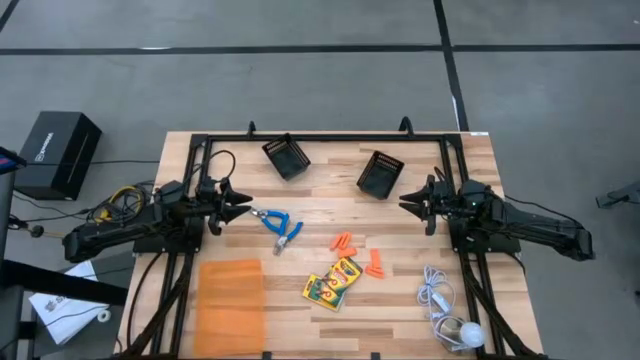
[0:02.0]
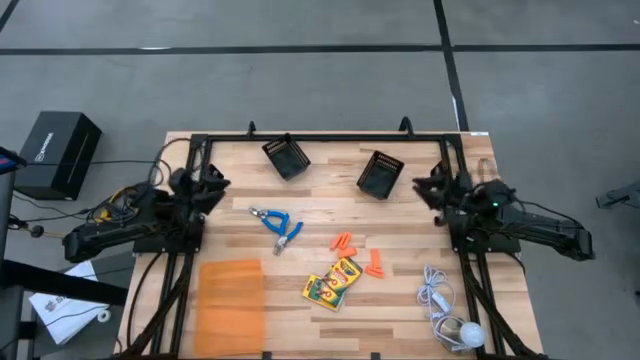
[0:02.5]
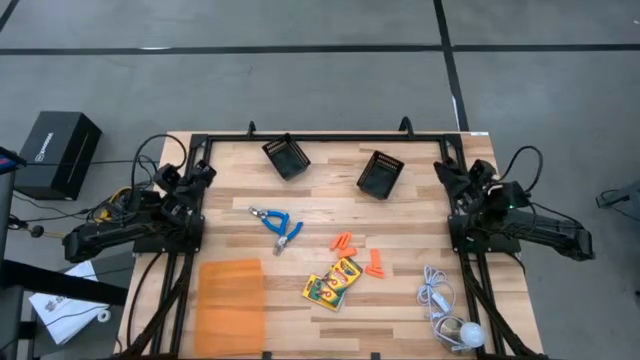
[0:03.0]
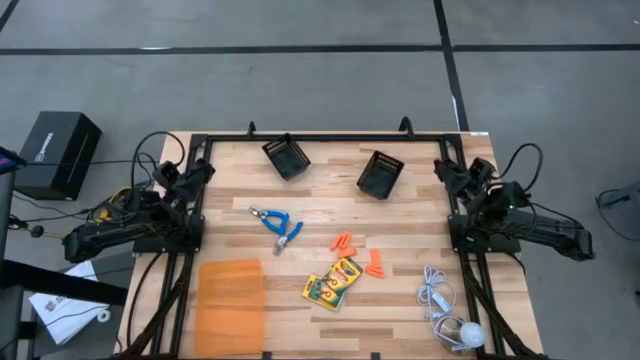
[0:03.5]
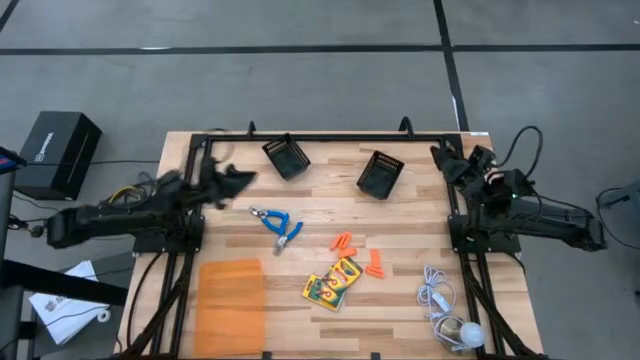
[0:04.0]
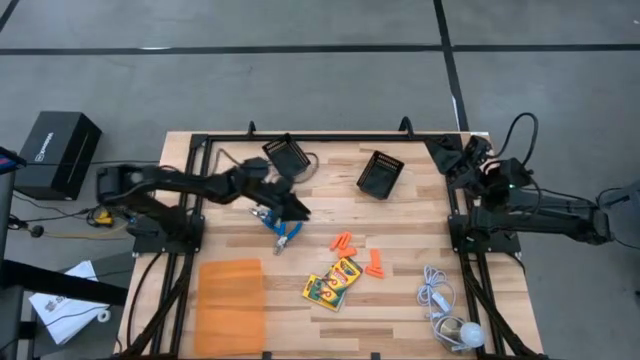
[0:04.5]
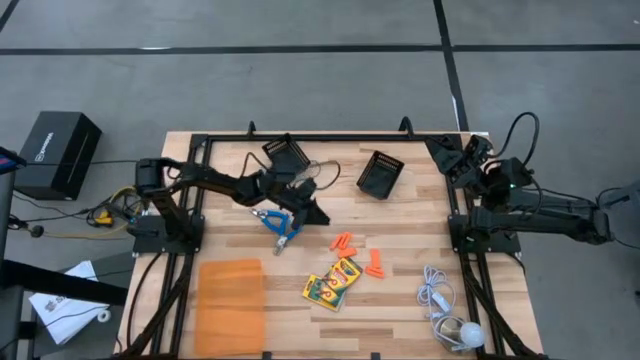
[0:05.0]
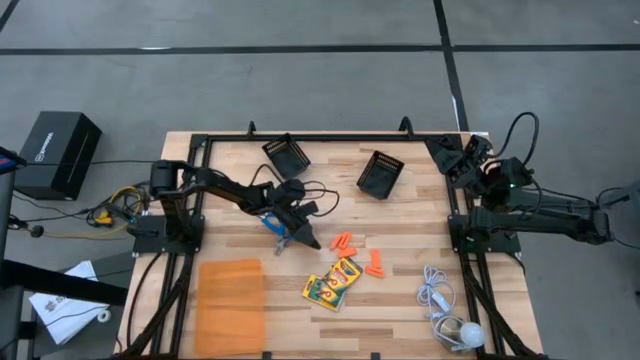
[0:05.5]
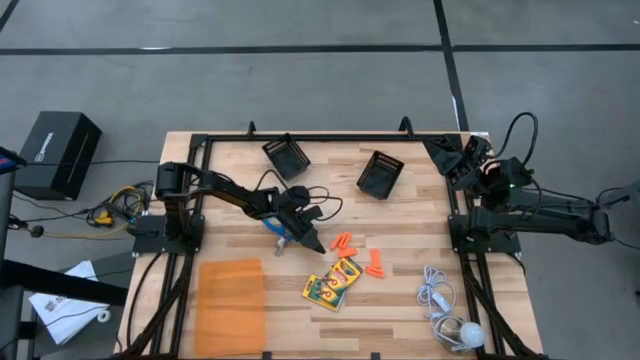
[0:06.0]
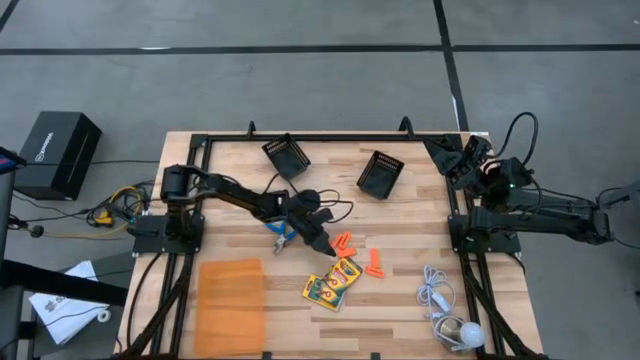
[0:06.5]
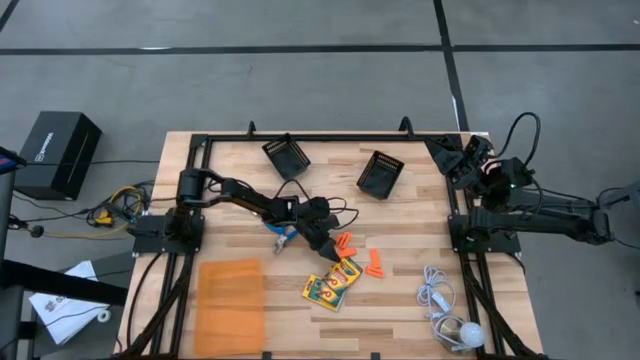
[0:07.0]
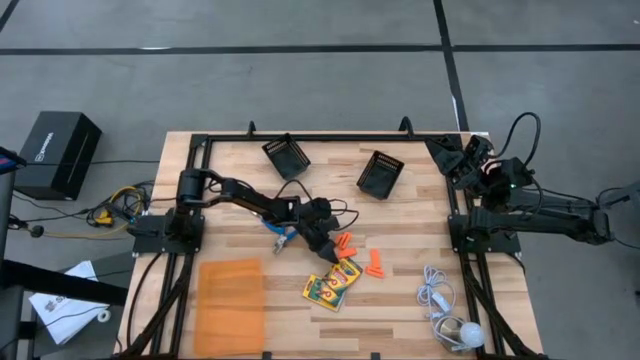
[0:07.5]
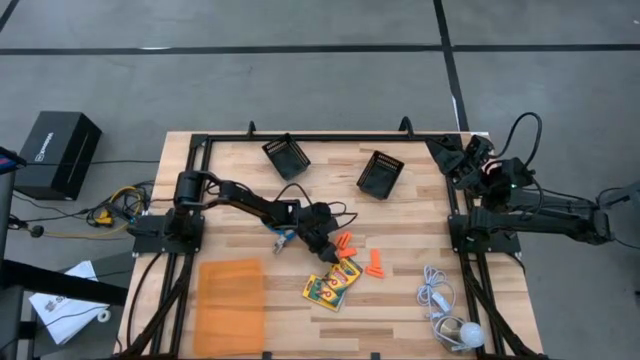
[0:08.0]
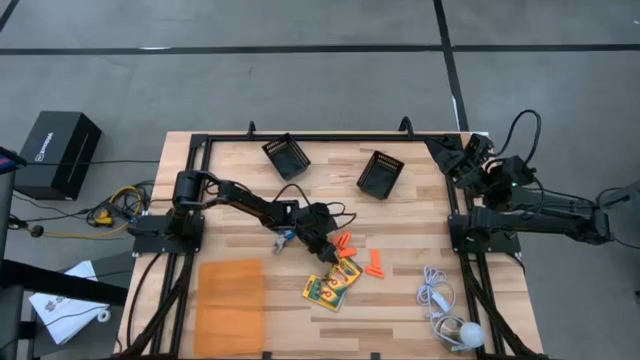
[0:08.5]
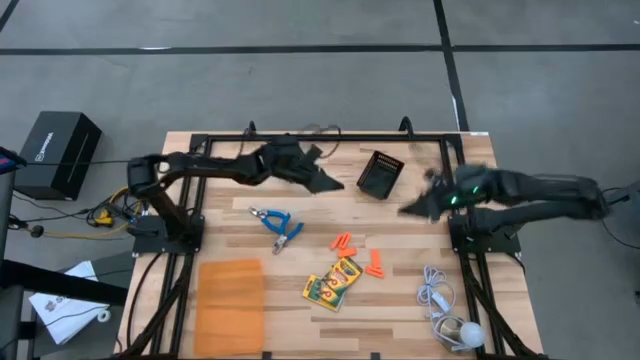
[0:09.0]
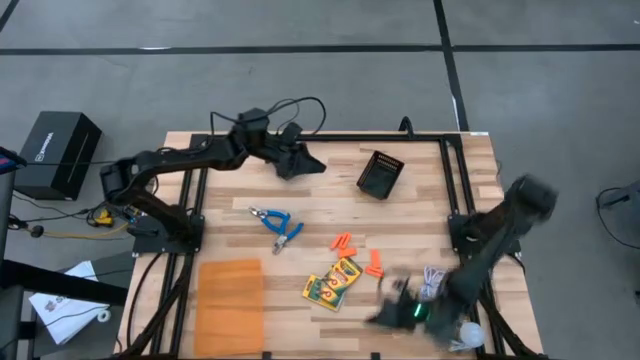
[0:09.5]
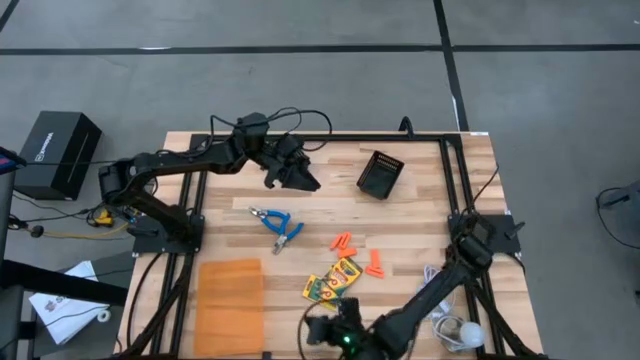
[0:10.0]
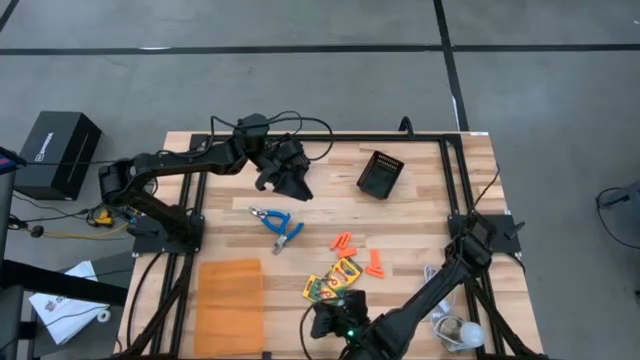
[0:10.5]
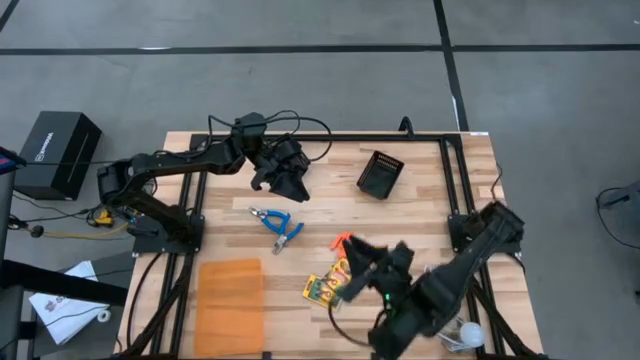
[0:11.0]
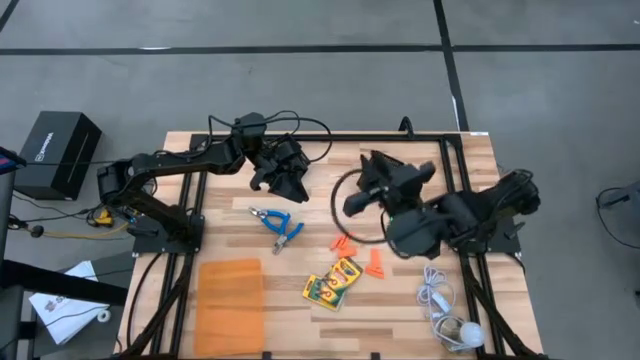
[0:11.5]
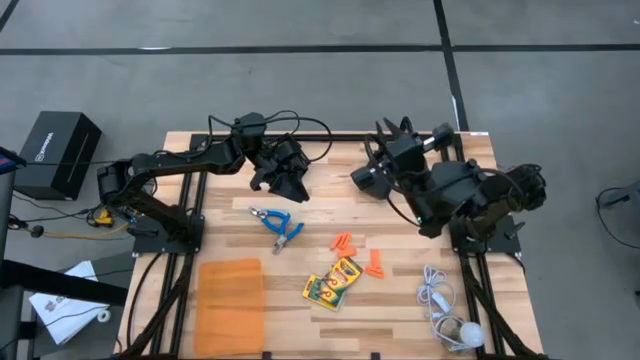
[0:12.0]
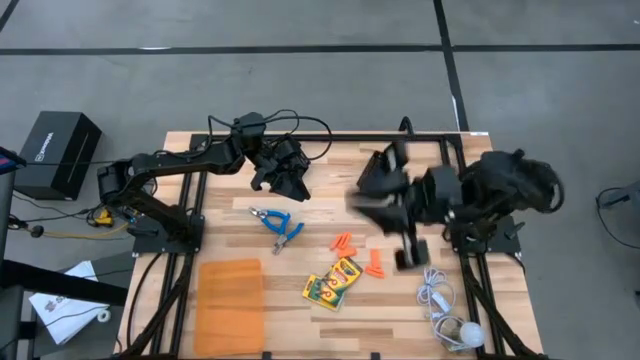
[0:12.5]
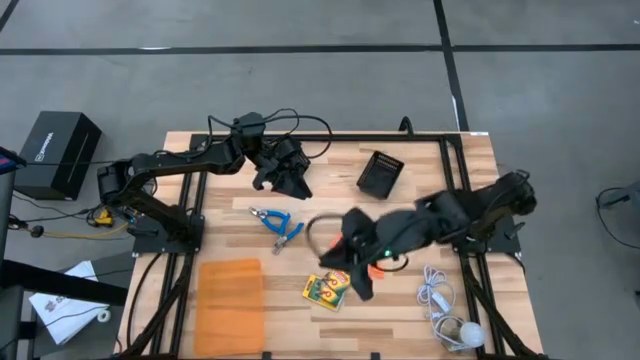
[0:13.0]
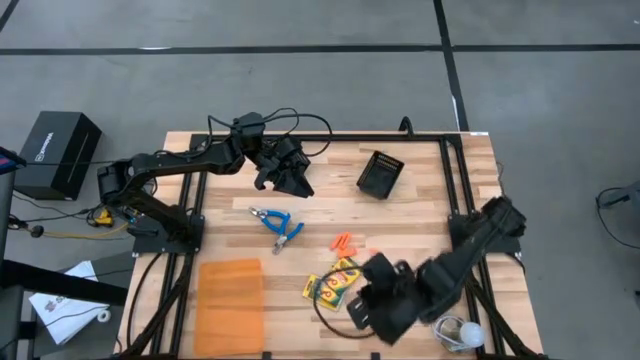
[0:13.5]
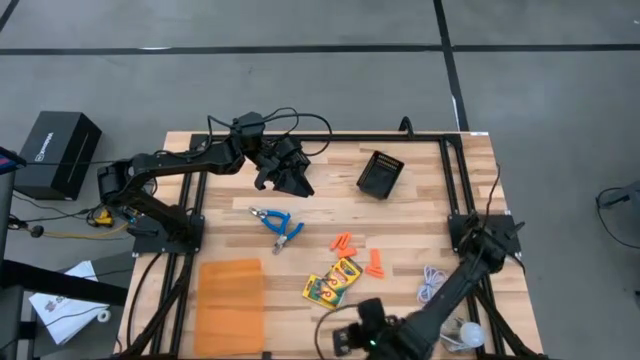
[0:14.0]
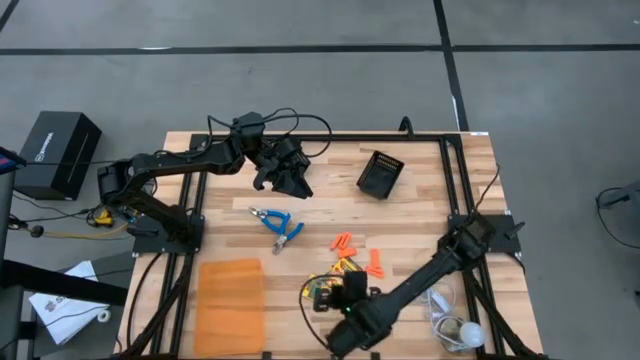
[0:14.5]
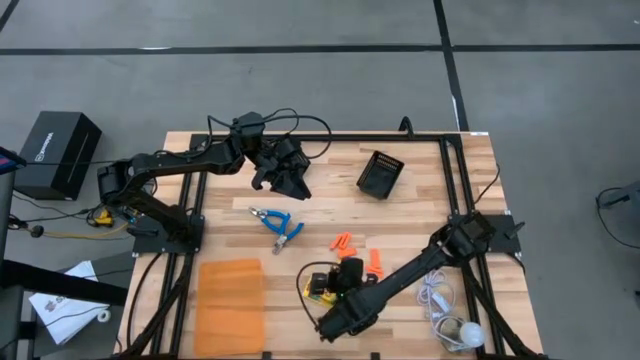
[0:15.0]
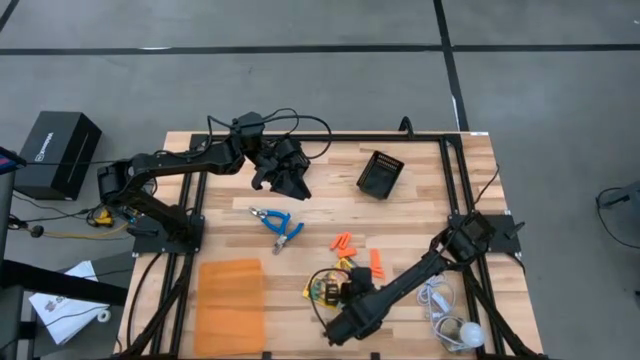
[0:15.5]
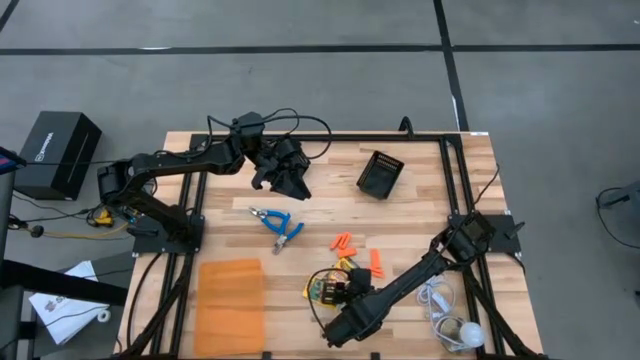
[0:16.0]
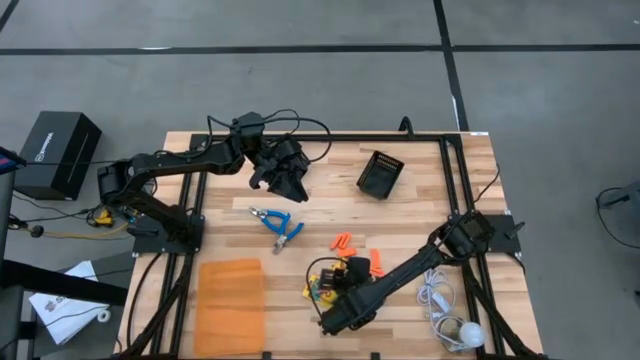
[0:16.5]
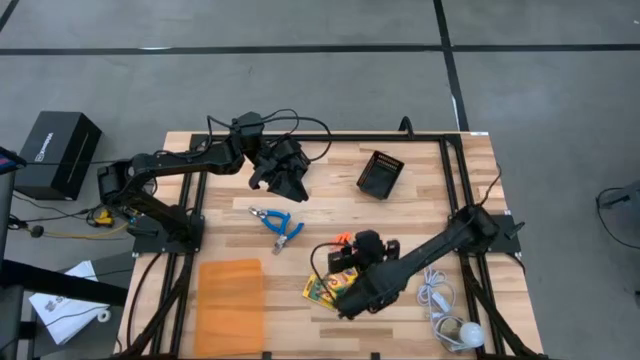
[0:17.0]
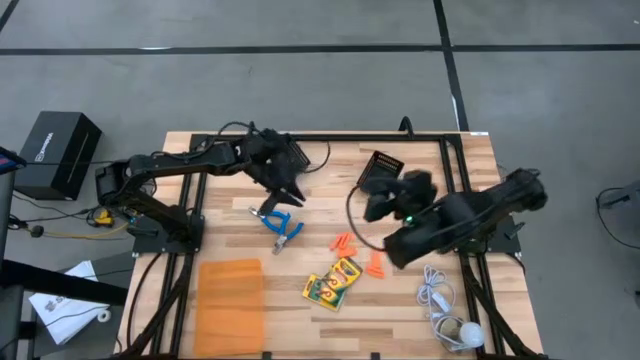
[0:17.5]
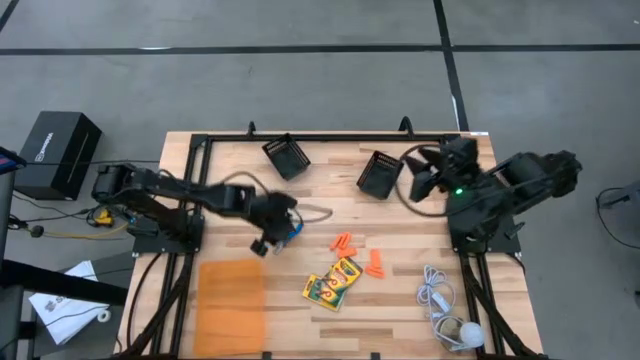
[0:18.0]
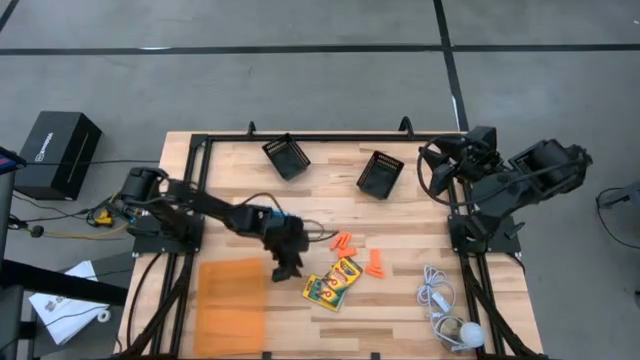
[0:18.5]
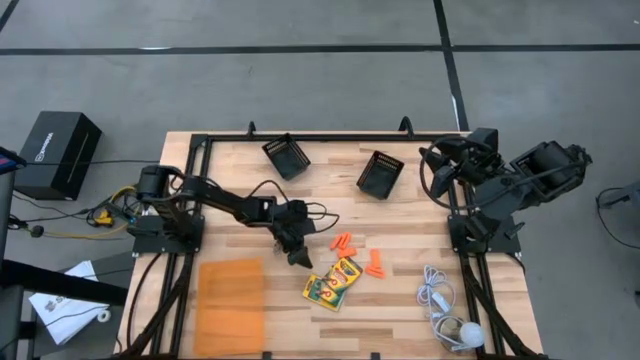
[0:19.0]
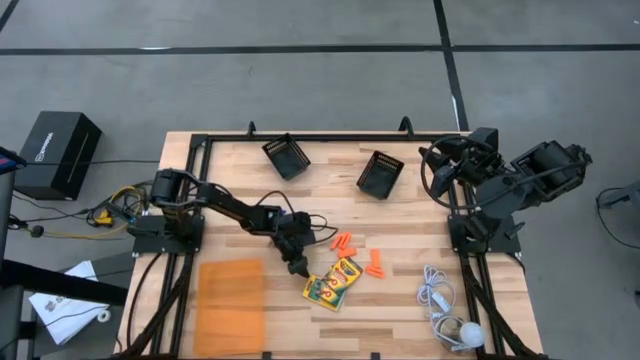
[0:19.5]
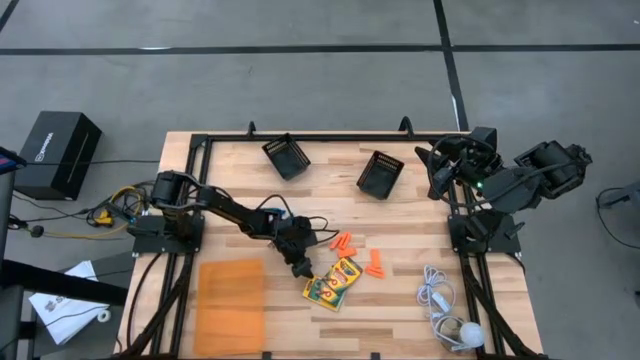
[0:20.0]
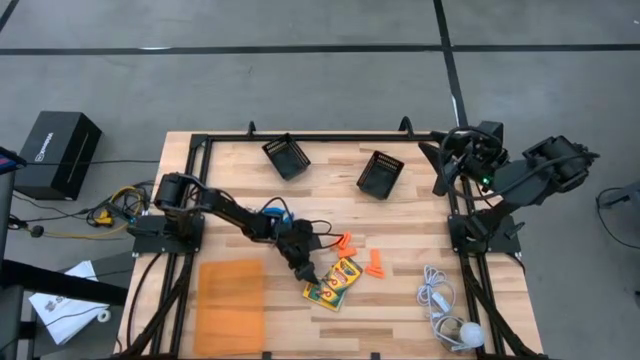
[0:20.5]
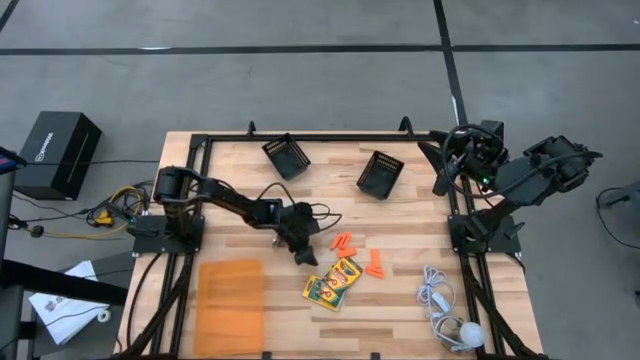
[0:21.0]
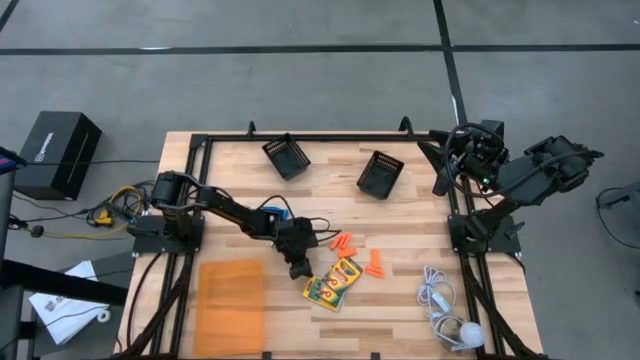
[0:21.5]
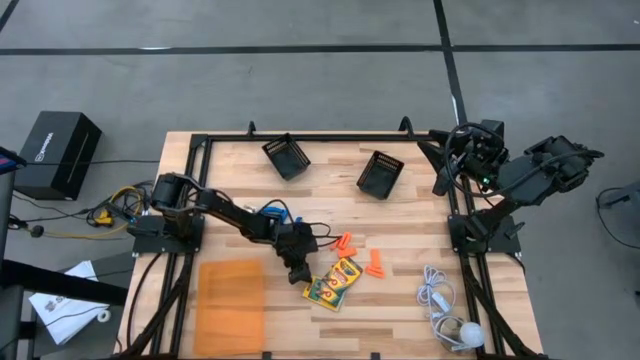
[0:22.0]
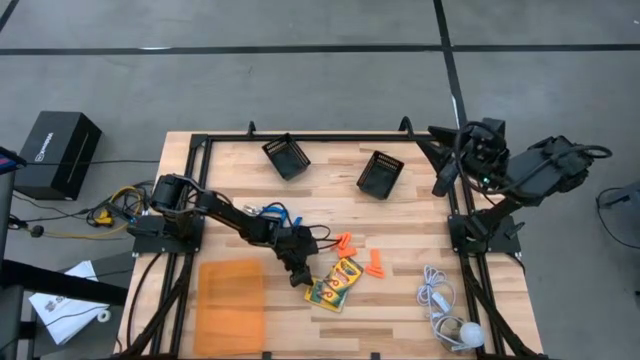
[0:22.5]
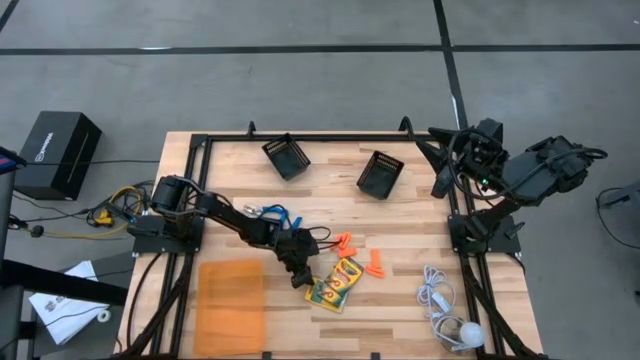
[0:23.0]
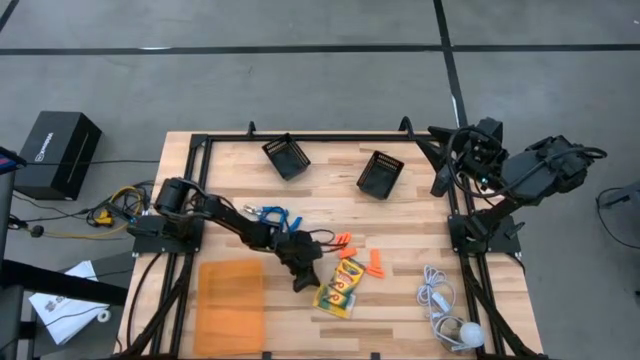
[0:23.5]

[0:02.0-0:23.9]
Task: Pick & Place School Supplies
Put the crayon box into the orange transparent bin
